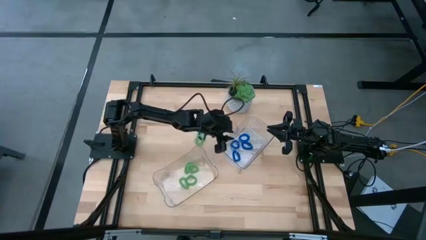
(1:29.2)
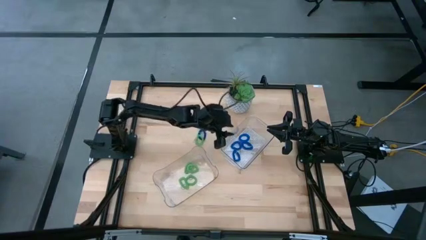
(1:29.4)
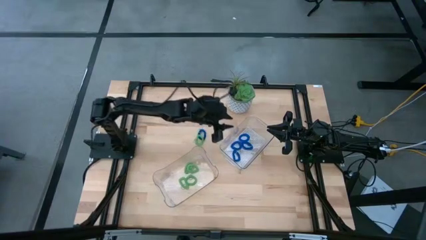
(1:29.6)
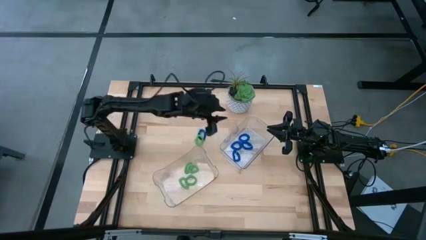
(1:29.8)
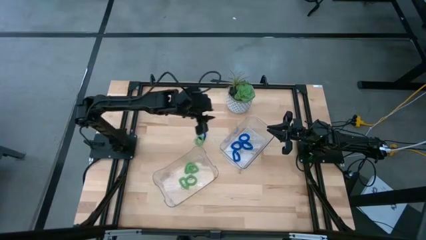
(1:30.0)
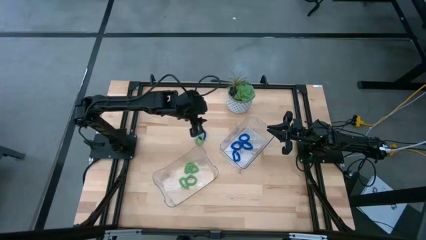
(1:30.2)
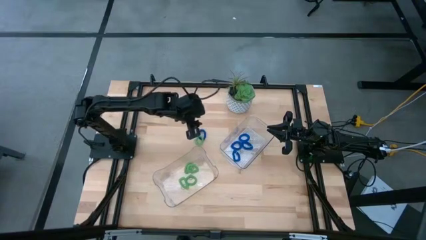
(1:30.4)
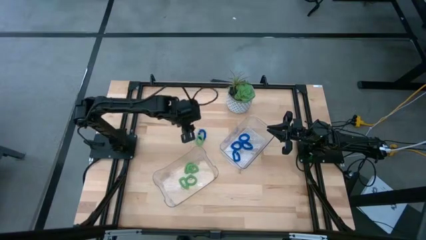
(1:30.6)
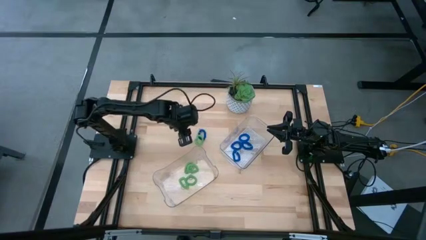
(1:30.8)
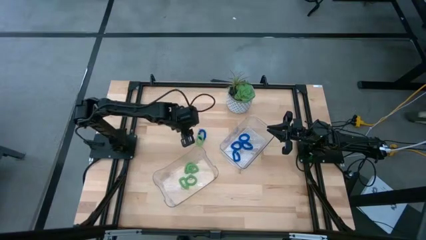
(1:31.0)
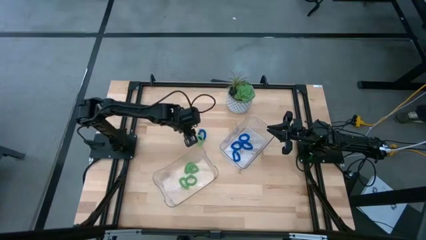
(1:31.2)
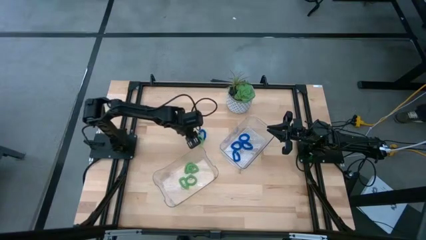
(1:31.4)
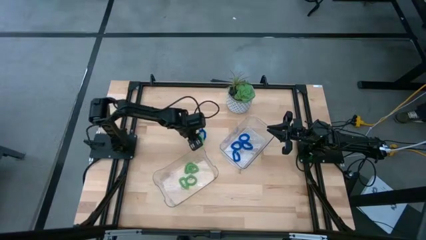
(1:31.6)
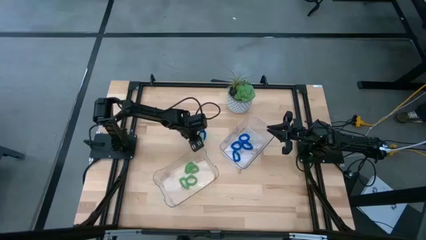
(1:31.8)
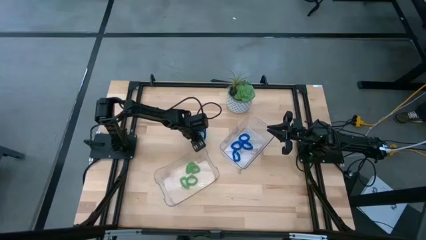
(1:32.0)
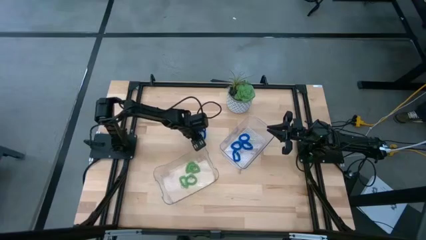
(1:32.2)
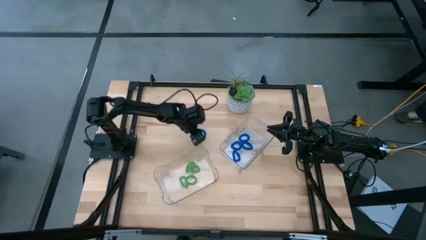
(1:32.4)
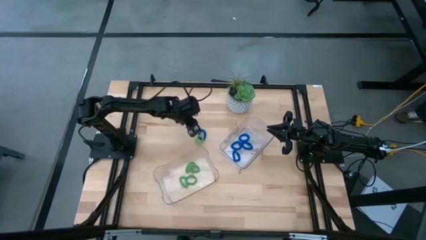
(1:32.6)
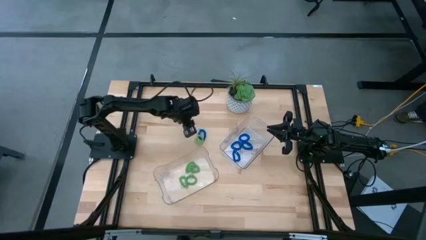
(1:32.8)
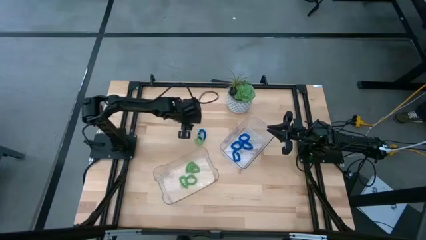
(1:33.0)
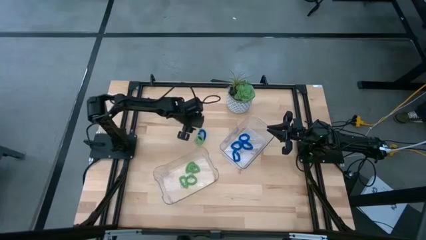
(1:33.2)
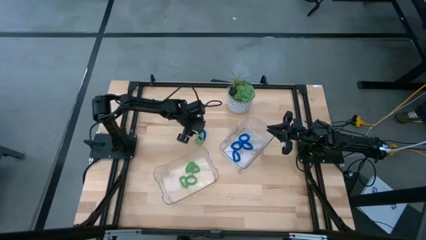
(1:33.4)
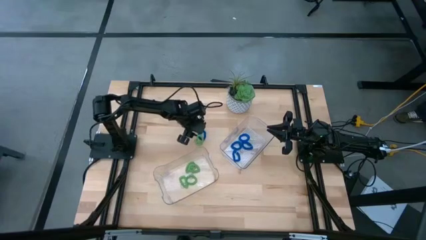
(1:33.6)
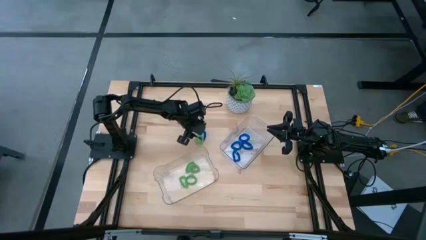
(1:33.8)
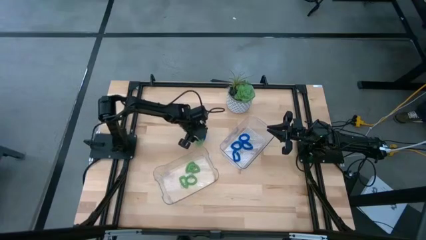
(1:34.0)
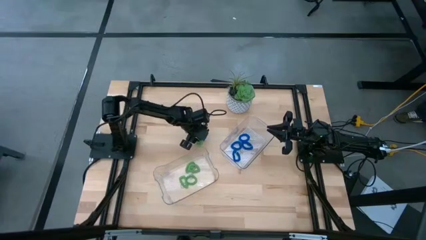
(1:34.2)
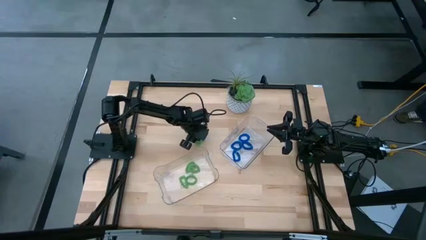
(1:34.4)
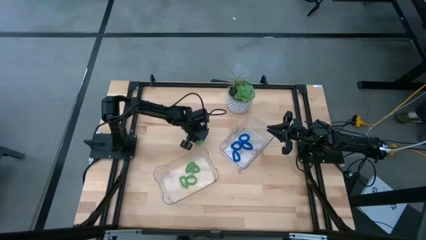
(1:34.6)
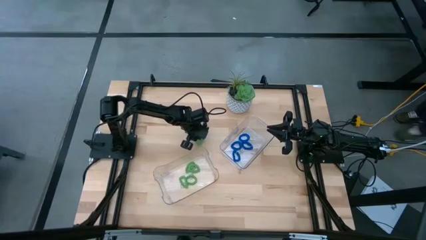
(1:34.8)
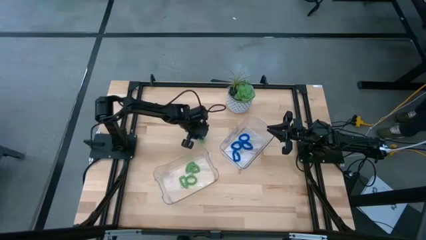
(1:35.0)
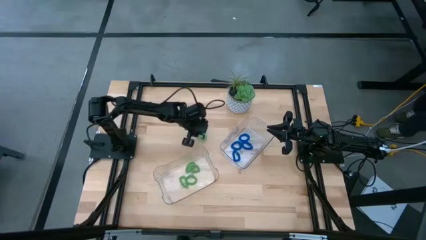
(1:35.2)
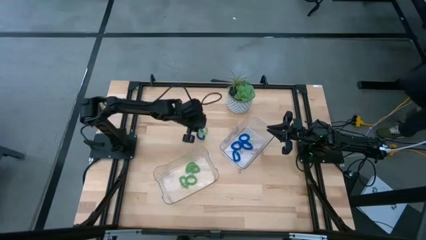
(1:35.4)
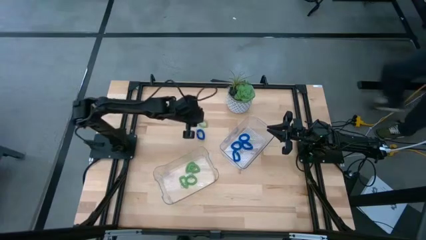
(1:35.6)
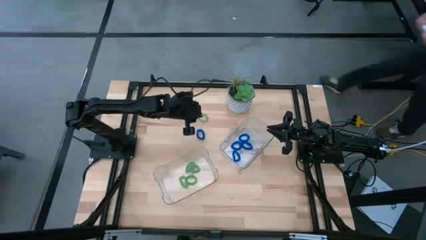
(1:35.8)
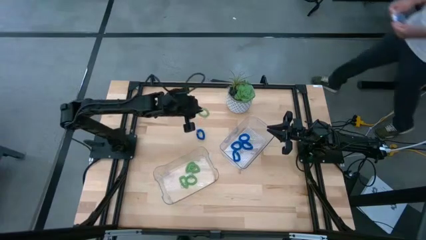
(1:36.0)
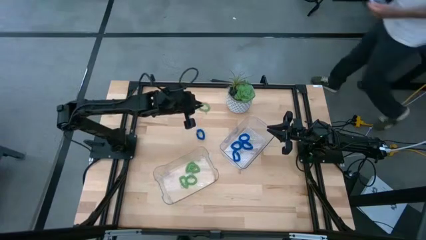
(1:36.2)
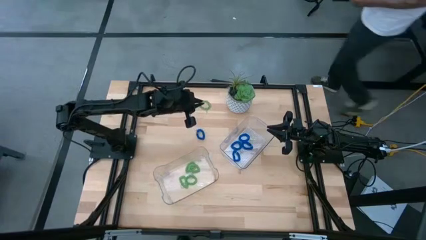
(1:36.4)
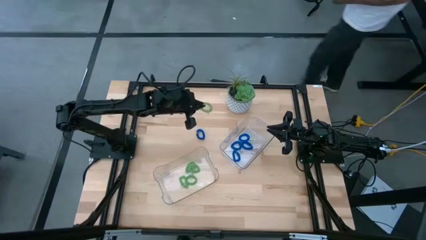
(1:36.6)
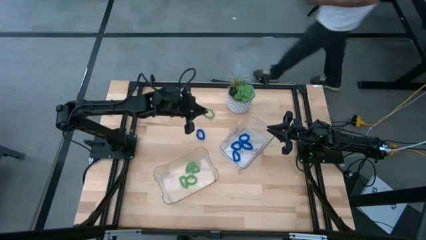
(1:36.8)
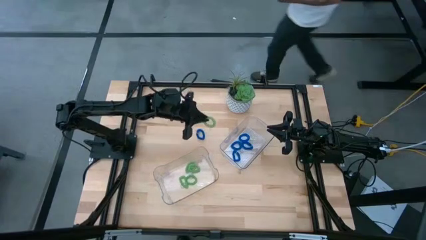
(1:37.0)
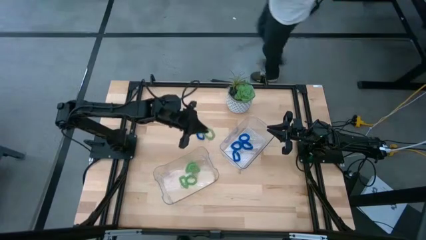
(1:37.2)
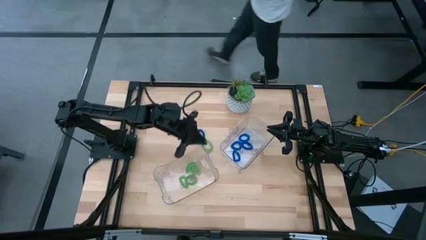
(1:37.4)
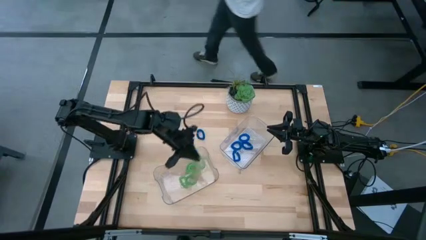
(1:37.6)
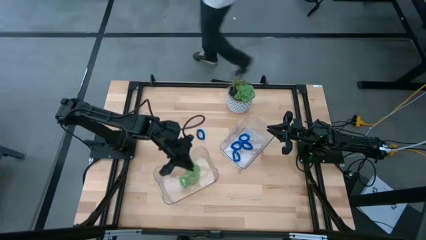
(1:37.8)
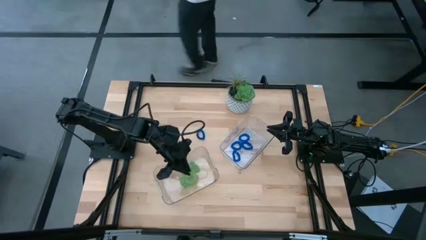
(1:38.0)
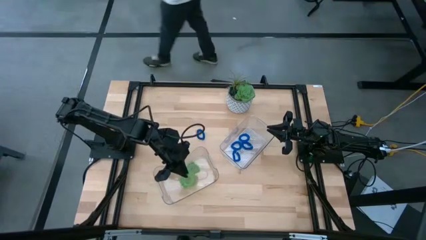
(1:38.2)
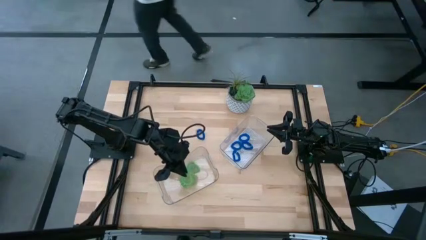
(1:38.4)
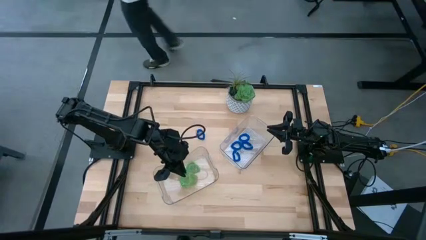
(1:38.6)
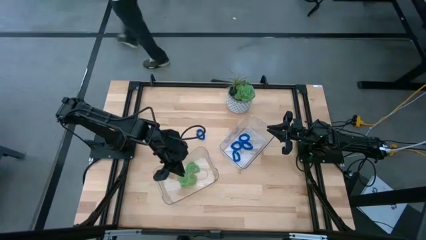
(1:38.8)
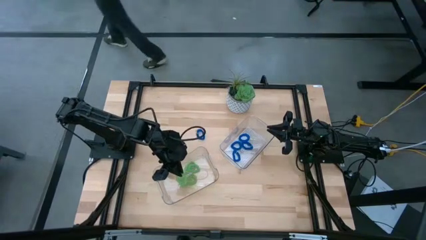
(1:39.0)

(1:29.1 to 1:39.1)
Task: Sort spring keychains
Put the green spring keychain into the bottom transparent bin

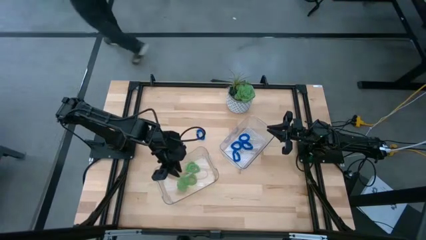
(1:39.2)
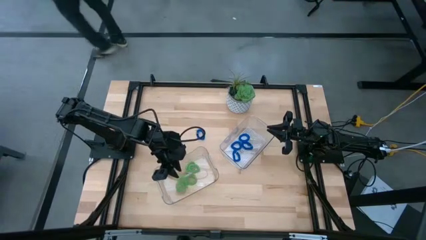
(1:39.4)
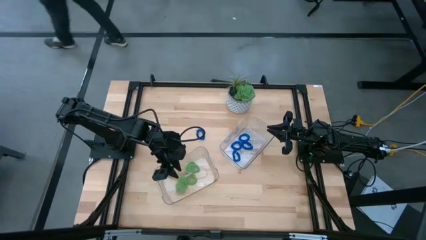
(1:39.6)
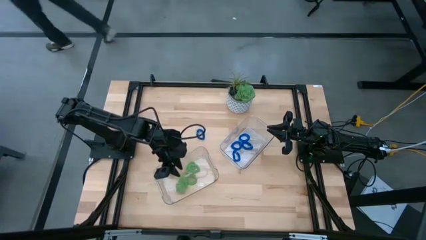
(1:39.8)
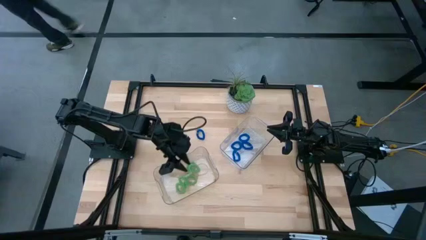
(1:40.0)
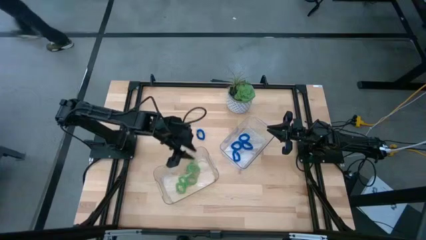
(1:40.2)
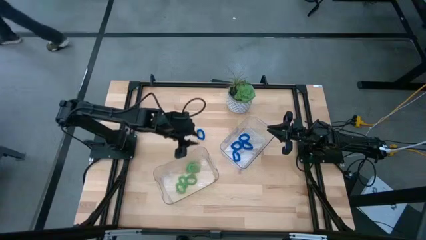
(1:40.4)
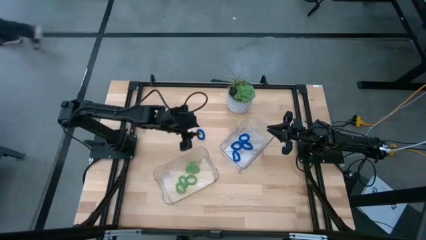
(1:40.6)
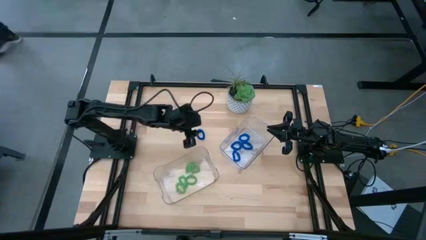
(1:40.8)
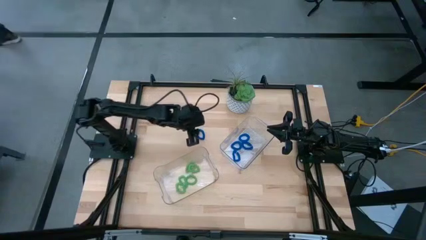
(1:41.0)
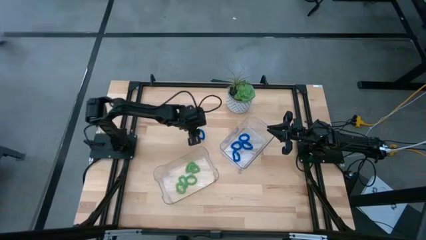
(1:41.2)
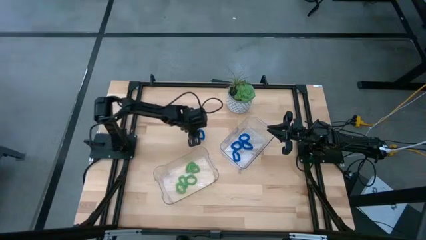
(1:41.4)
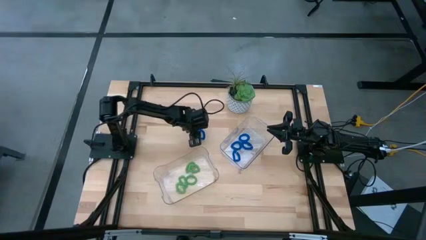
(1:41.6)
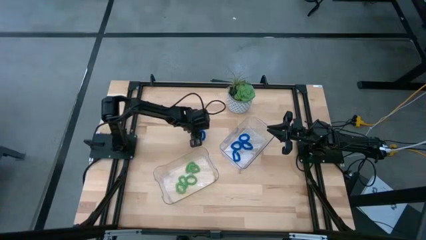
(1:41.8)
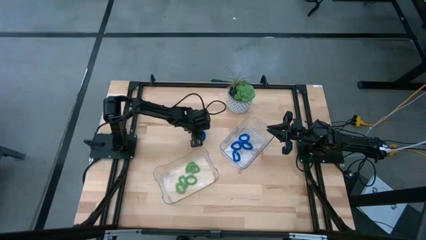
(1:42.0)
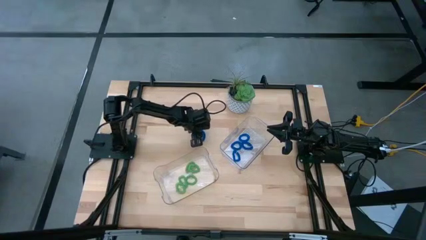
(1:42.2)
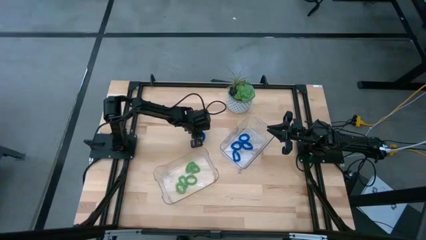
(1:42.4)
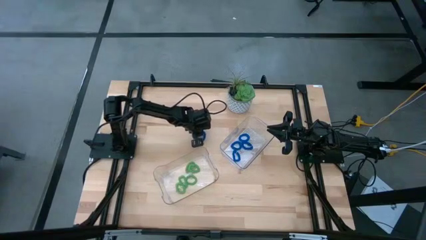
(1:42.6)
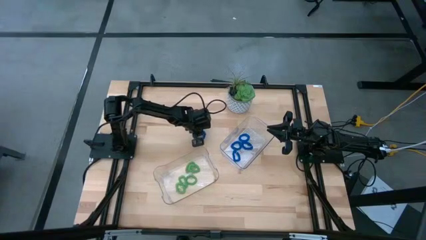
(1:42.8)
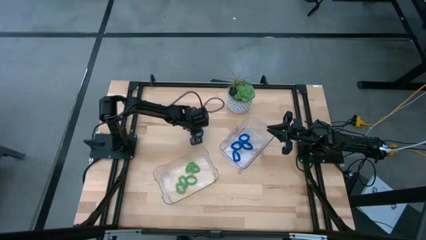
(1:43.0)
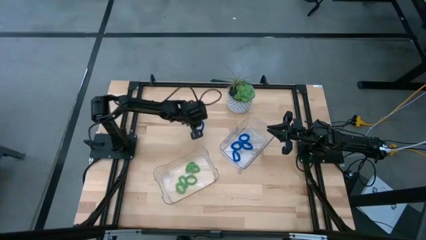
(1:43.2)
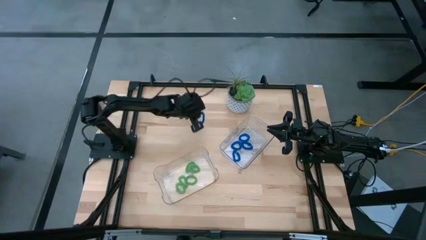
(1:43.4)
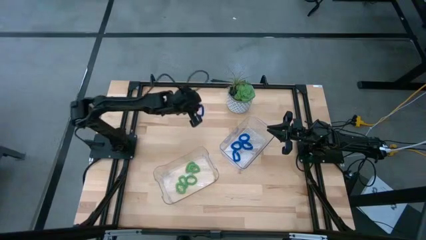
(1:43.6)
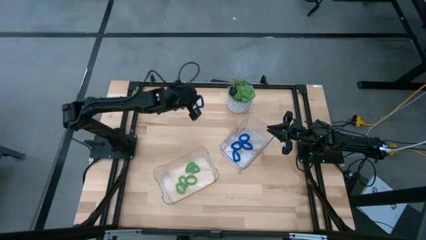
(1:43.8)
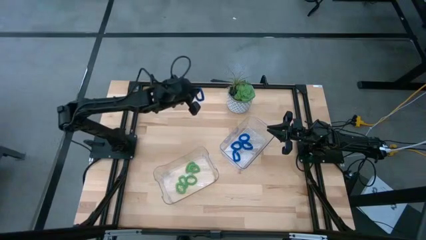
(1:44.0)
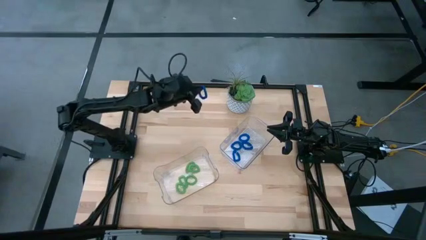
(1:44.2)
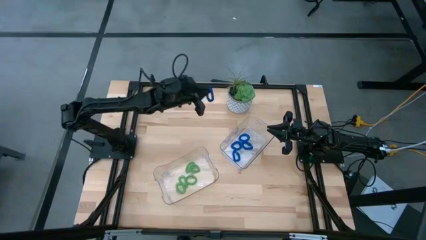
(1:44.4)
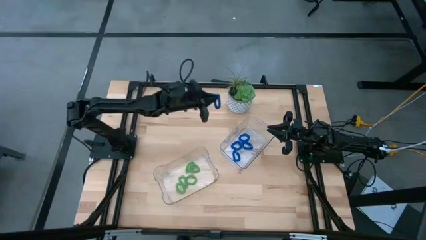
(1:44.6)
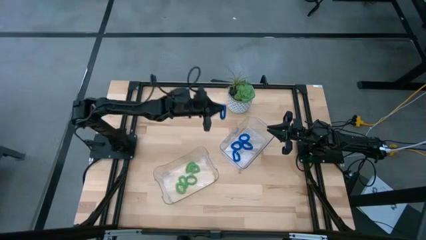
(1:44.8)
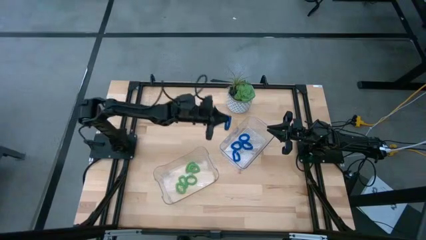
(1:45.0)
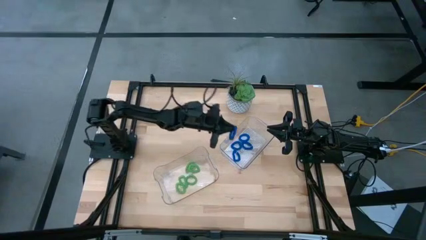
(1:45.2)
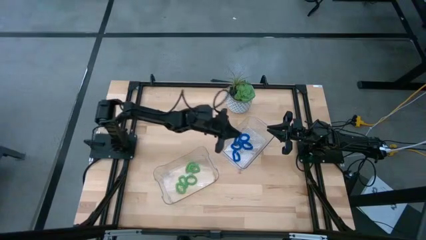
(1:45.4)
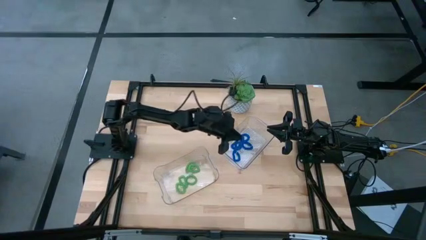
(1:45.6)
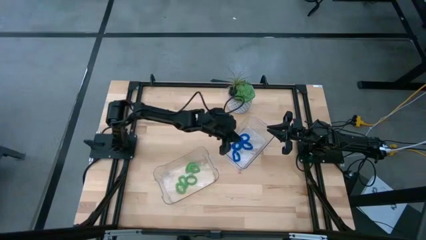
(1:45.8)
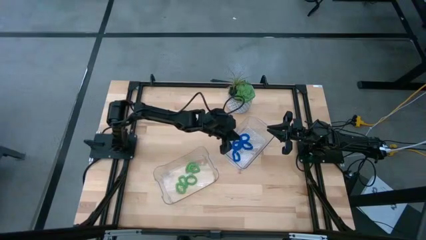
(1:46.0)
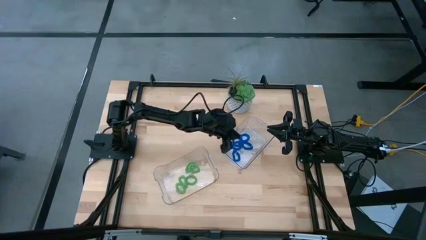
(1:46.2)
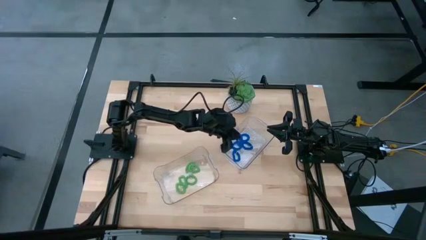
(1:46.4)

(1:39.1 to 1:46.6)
Put the blue spring keychain into the top transparent bin
